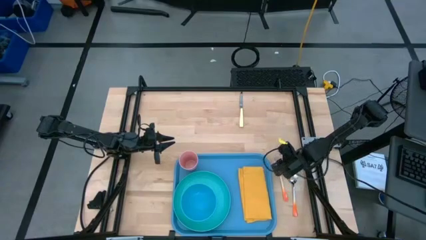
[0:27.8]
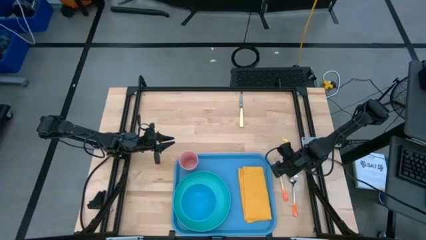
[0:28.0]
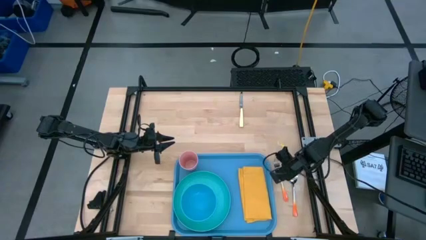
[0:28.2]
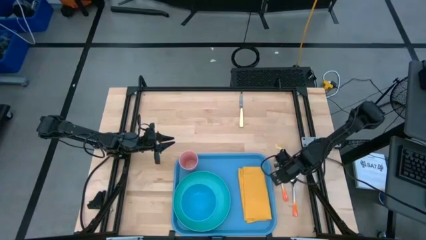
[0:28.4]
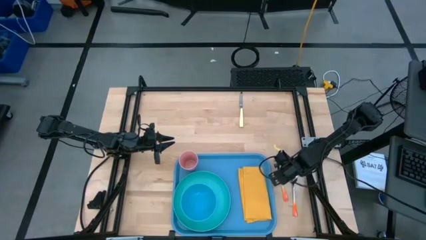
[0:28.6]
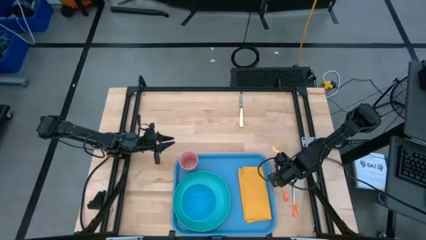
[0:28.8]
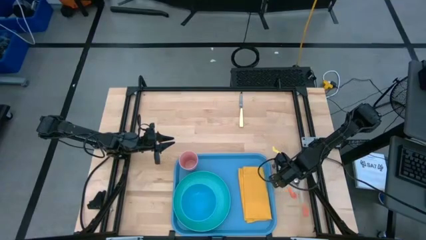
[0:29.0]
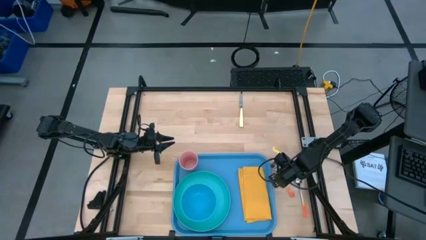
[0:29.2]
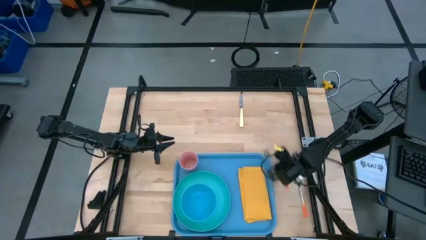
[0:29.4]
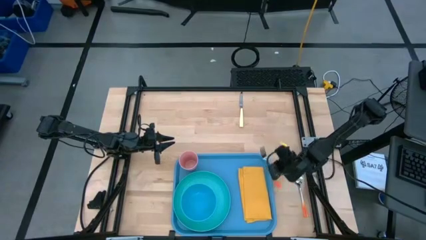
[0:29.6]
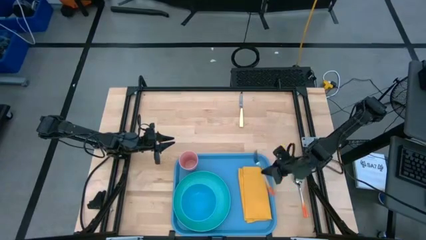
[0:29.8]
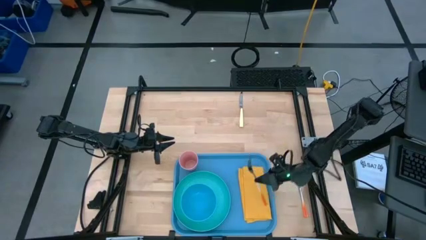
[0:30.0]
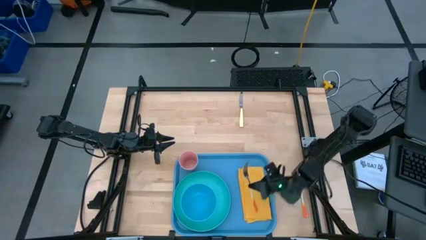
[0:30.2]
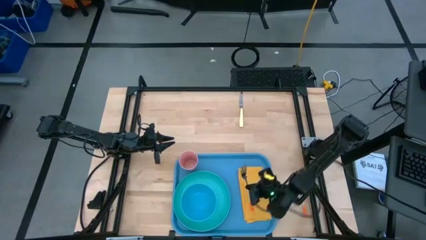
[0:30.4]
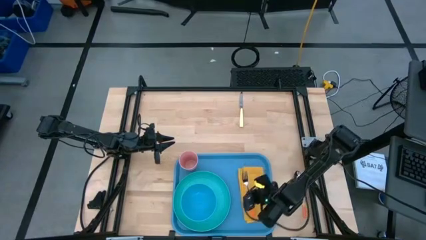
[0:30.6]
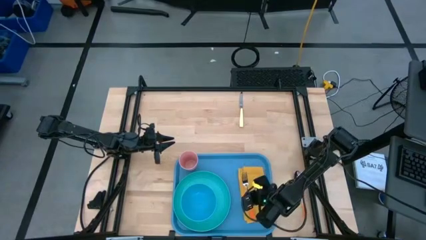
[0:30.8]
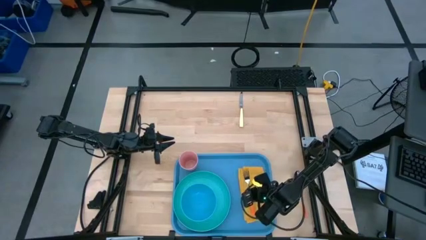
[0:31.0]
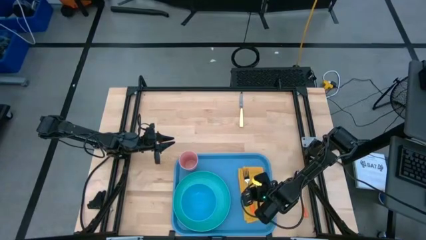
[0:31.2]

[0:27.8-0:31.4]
Task: Set up tray
Put the orange fork on the yellow table napkin

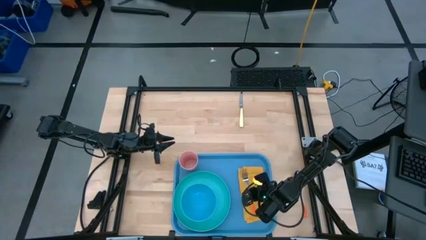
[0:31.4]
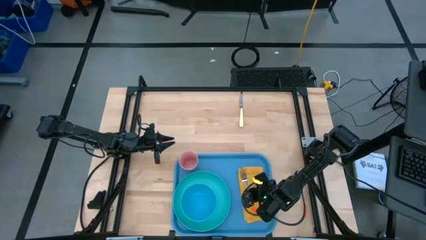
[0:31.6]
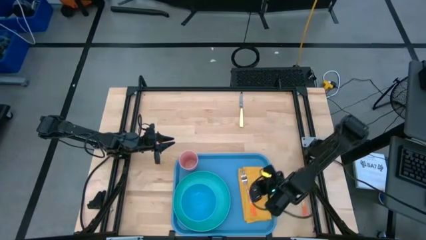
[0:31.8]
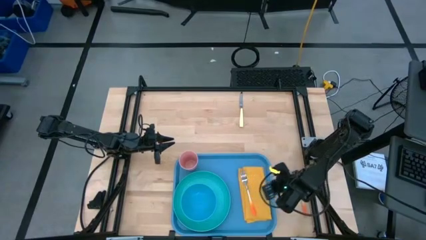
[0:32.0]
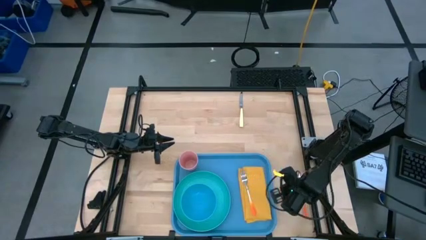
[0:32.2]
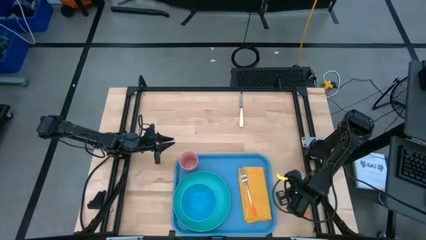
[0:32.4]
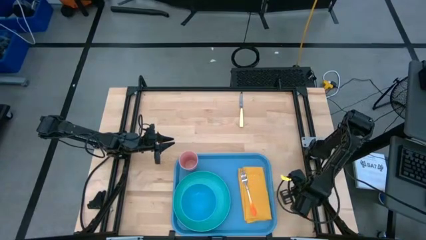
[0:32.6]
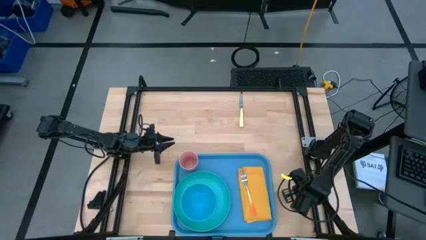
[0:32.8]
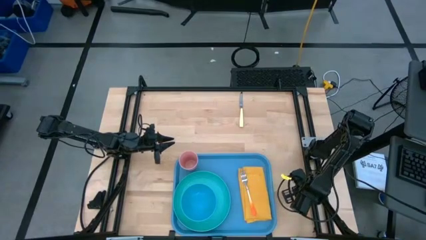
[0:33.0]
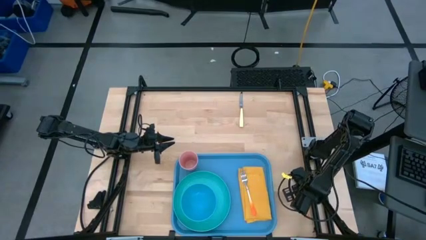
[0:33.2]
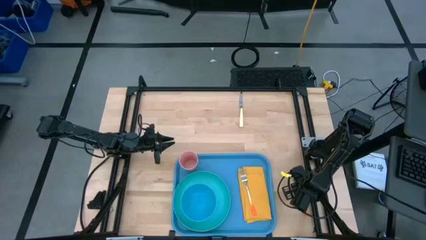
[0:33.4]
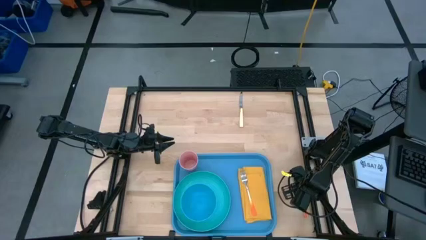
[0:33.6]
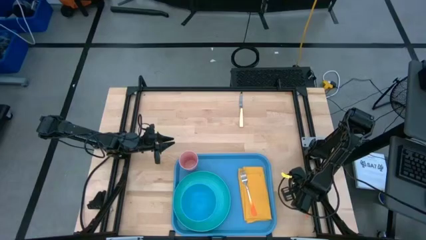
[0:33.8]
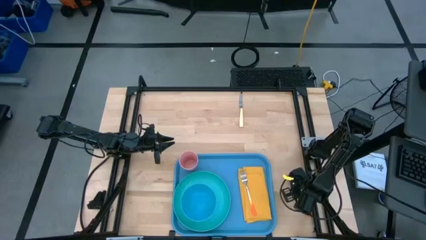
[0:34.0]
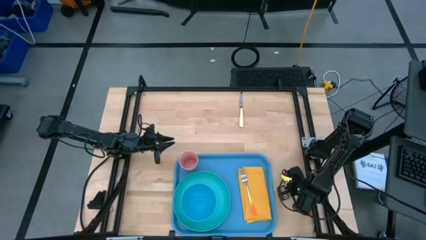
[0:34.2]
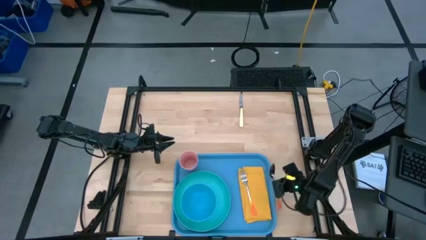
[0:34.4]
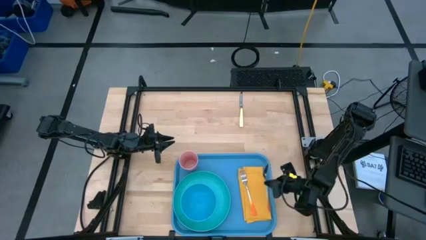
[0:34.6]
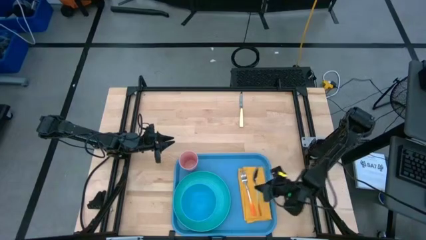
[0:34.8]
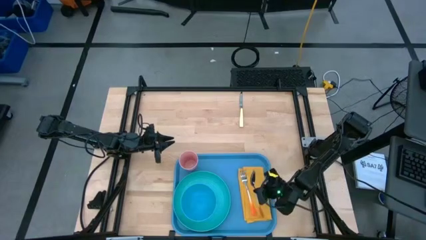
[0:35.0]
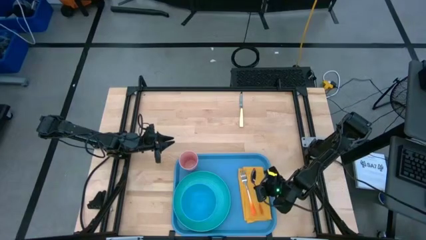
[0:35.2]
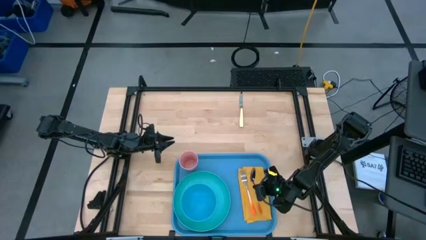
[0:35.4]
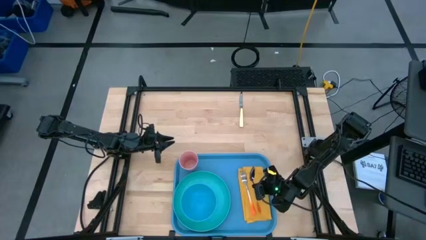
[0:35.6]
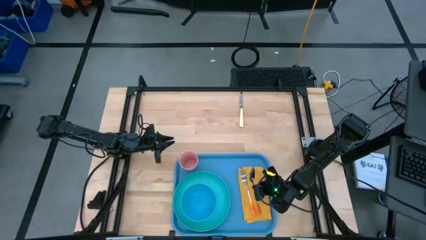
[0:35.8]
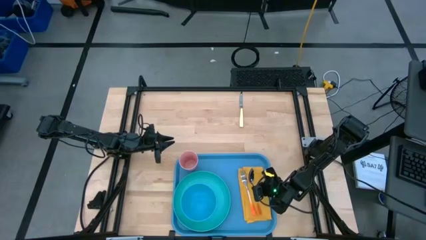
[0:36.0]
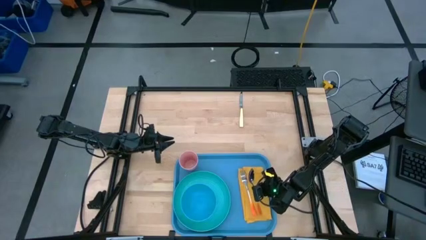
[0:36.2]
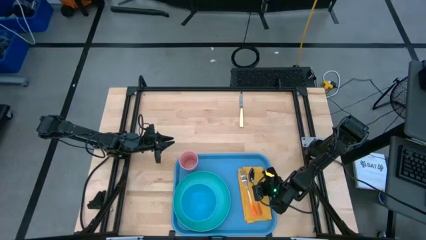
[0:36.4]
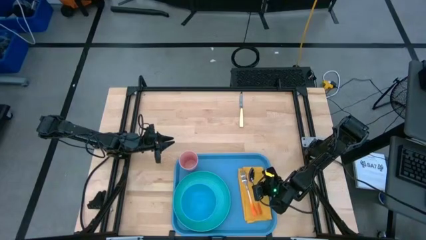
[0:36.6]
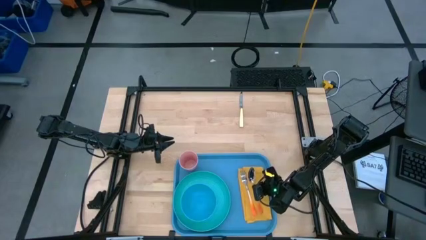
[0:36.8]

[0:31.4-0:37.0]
Put the orange spoon on the yellow table napkin to the right of the orange fork

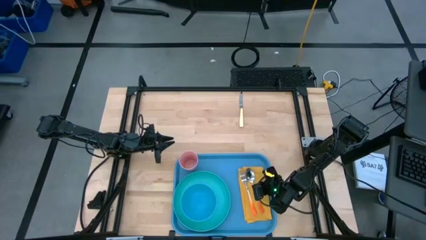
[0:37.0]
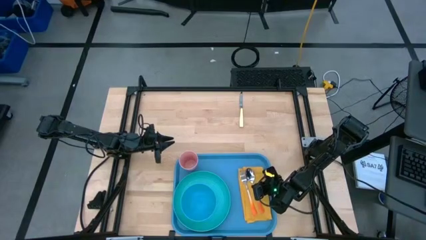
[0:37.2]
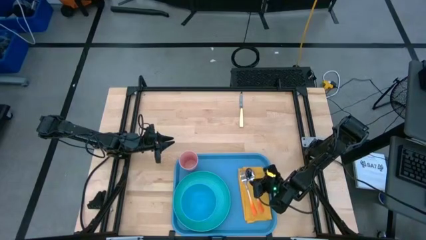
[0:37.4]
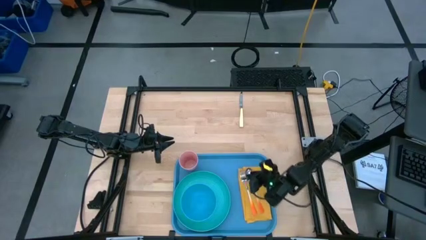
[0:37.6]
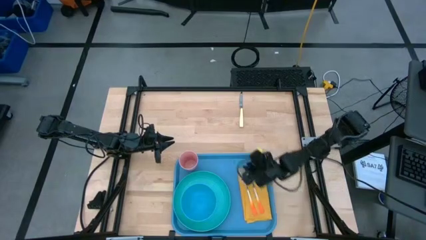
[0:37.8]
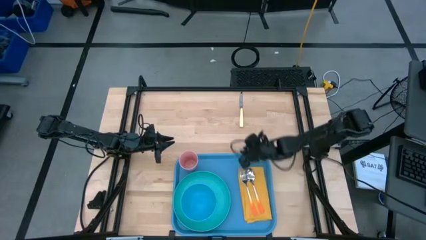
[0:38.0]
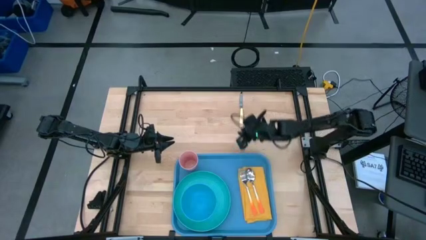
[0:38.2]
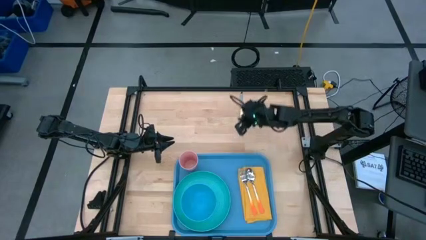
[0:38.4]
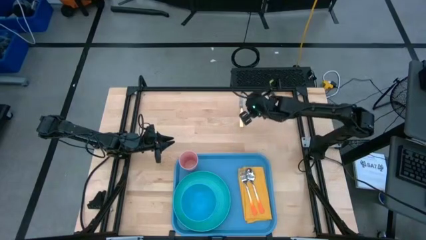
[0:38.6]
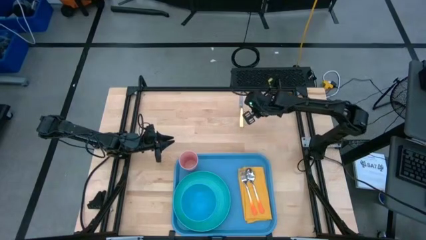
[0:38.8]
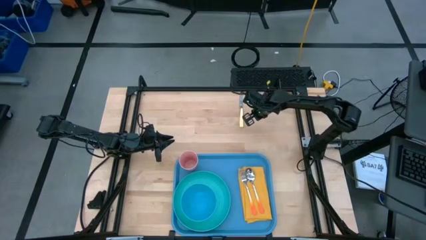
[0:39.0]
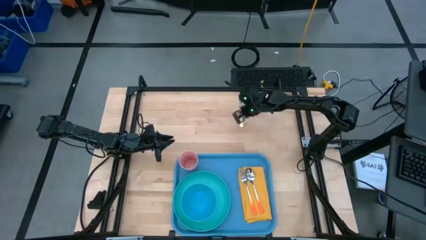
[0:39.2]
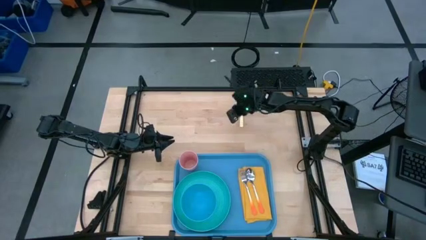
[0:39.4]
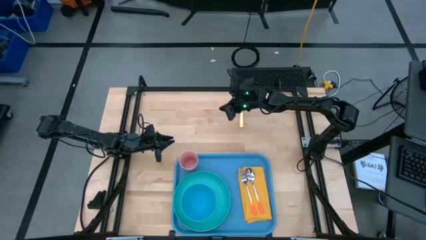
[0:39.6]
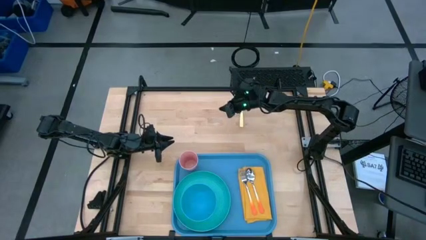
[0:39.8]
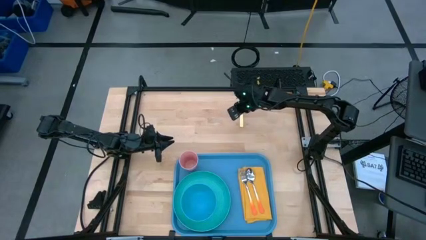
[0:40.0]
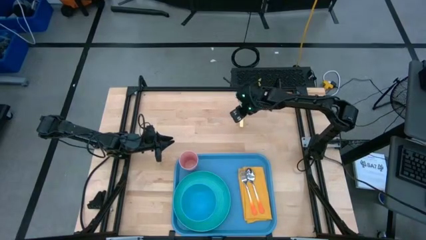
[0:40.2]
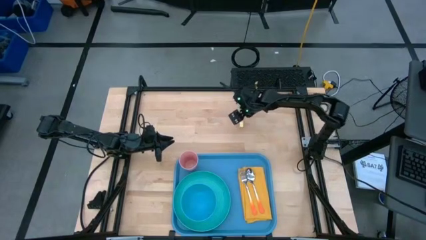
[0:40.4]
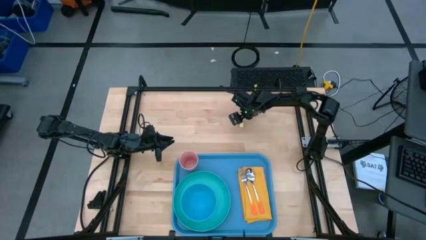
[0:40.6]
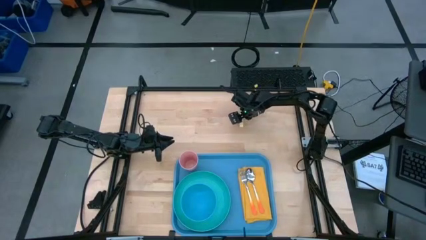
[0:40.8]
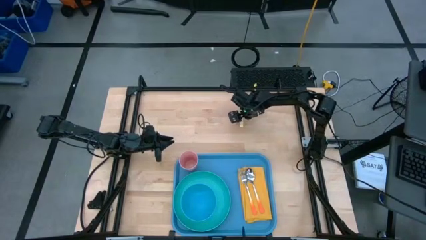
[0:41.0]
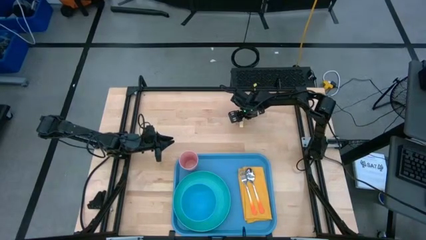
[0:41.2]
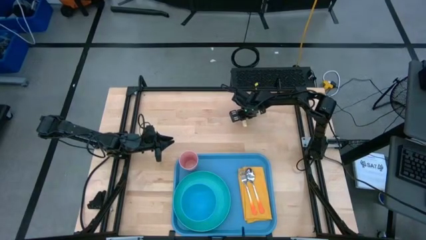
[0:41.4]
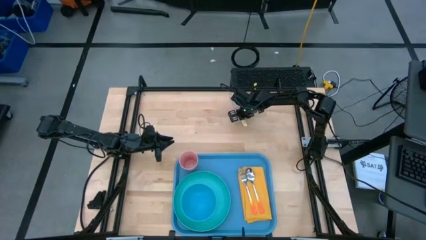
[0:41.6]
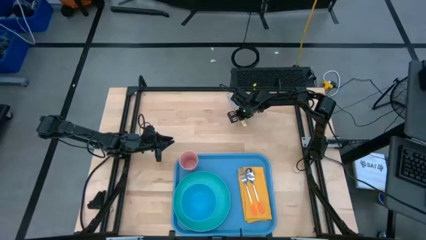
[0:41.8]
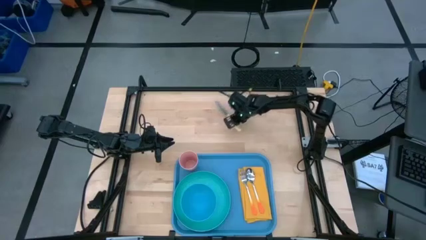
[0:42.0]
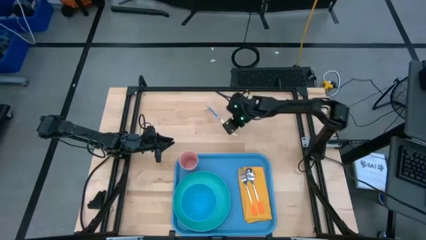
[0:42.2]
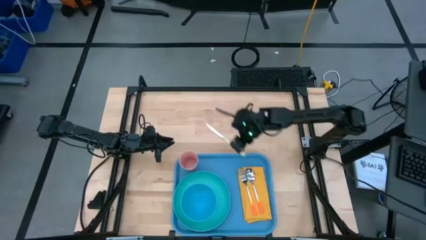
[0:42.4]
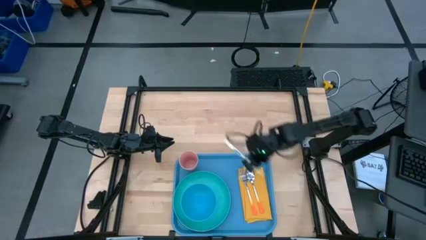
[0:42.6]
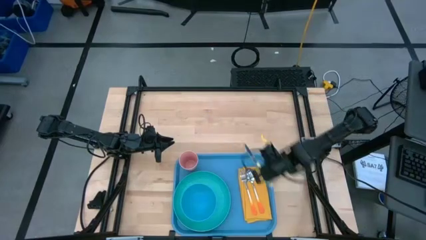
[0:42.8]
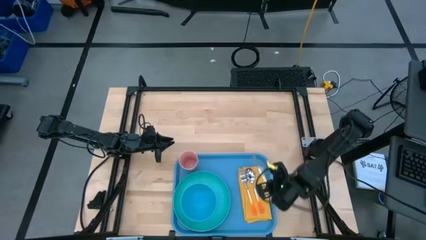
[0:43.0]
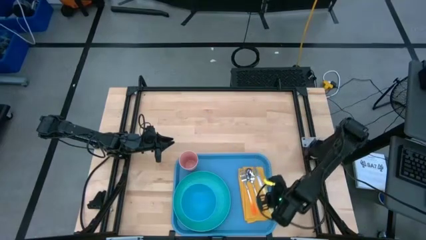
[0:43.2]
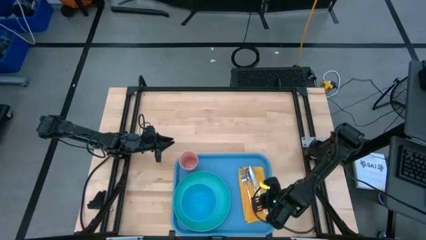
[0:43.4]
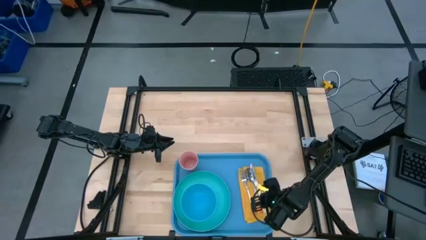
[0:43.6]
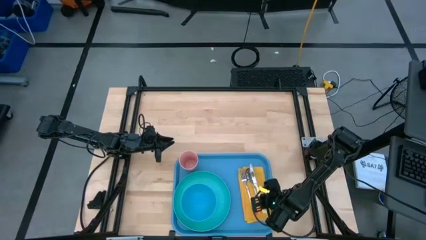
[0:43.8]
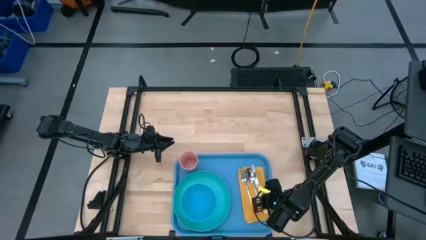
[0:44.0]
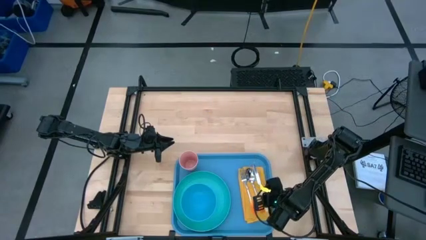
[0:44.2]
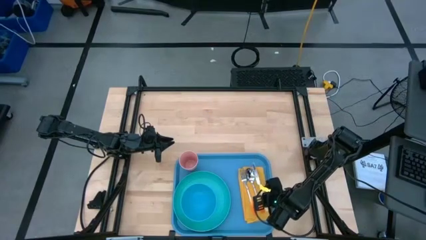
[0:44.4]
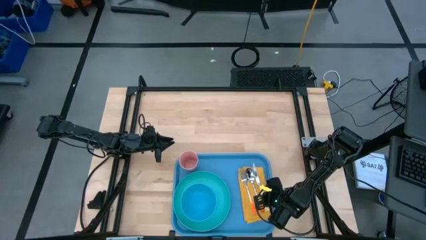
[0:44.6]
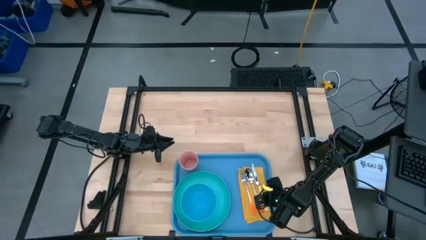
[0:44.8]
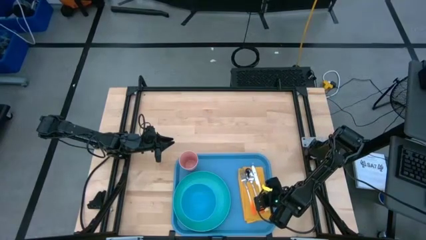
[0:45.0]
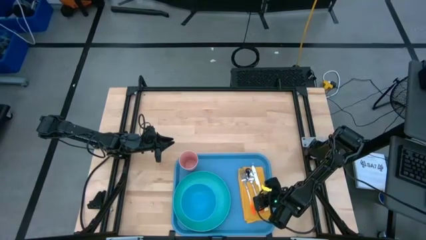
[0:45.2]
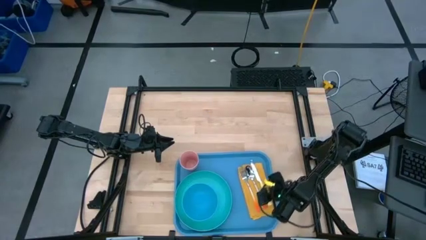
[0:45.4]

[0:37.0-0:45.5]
Put the yellow table knife on the yellow table napkin to the right of the orange spoon
